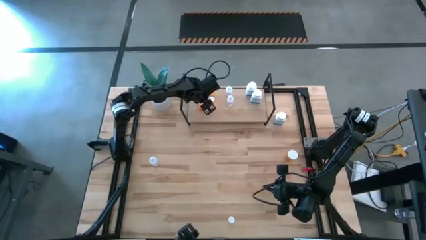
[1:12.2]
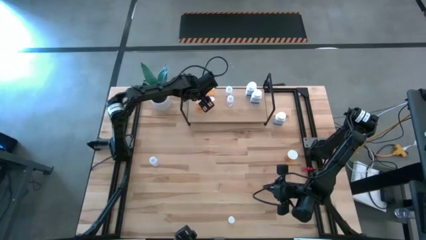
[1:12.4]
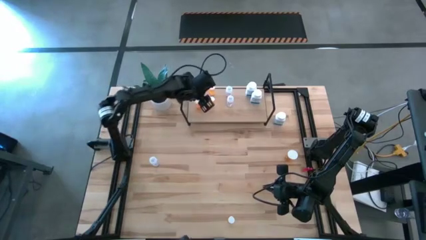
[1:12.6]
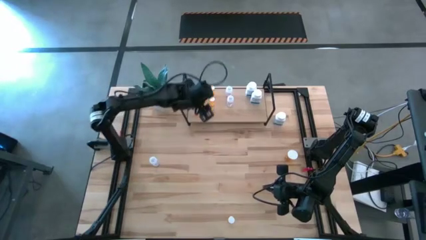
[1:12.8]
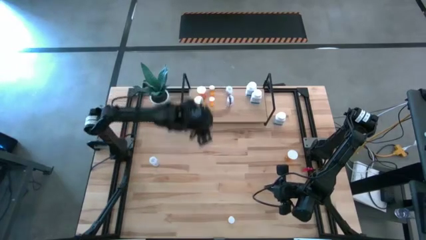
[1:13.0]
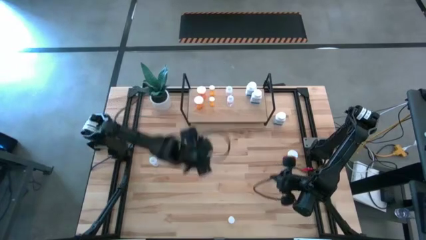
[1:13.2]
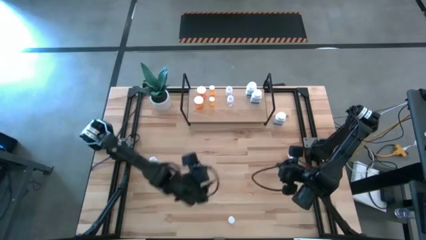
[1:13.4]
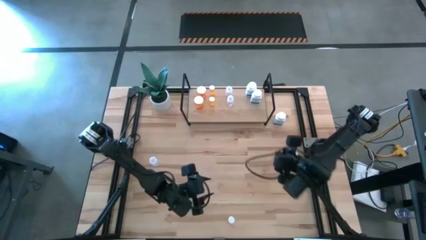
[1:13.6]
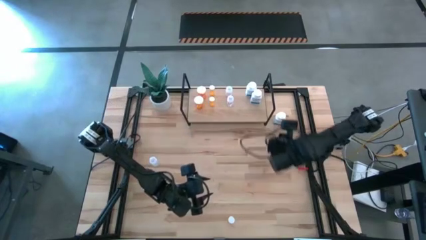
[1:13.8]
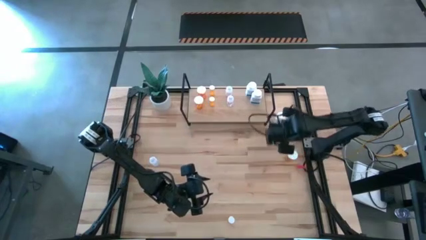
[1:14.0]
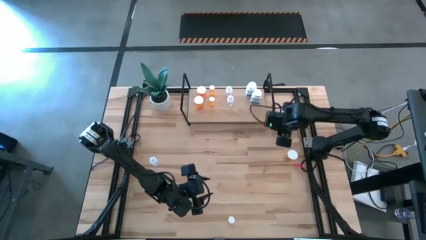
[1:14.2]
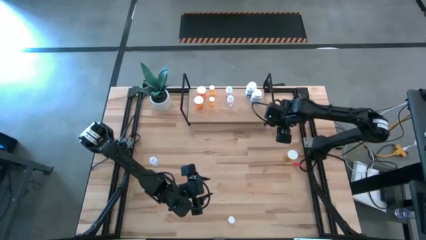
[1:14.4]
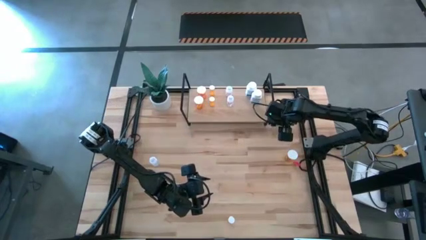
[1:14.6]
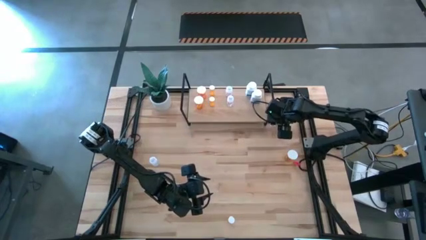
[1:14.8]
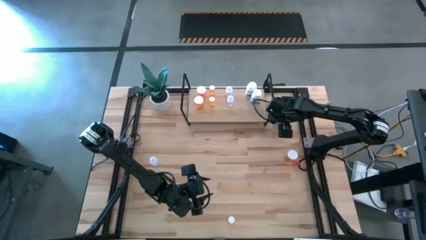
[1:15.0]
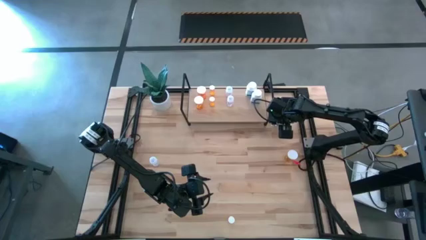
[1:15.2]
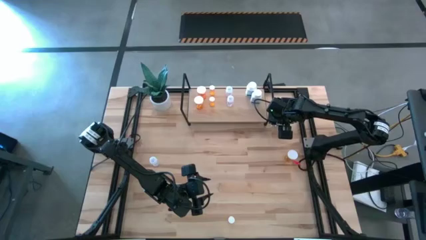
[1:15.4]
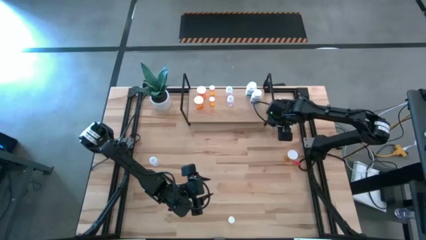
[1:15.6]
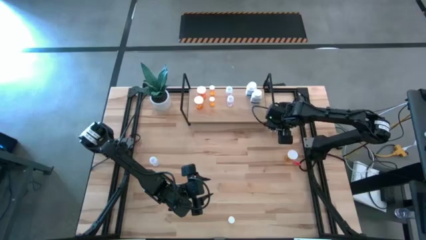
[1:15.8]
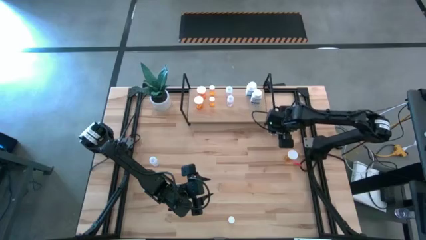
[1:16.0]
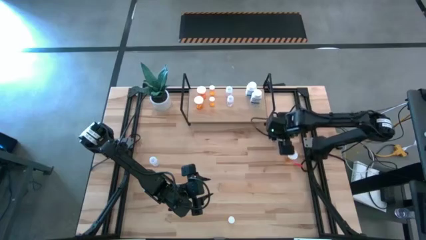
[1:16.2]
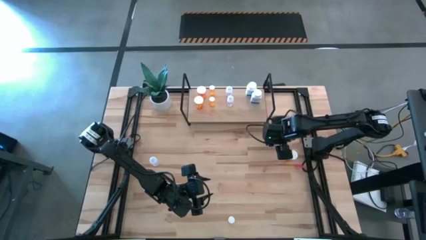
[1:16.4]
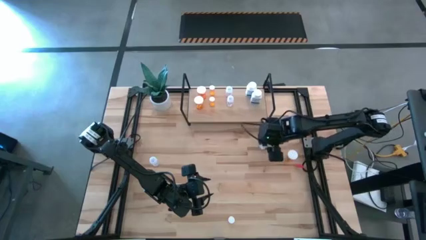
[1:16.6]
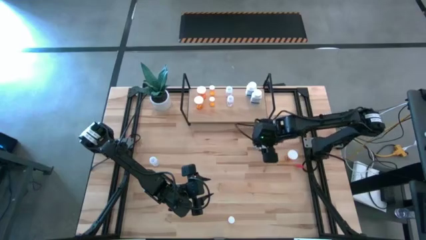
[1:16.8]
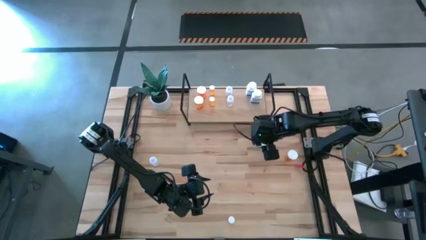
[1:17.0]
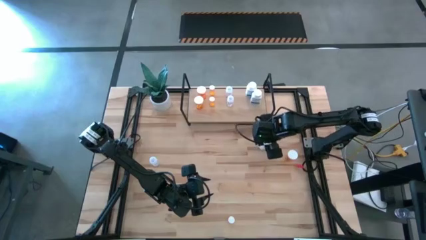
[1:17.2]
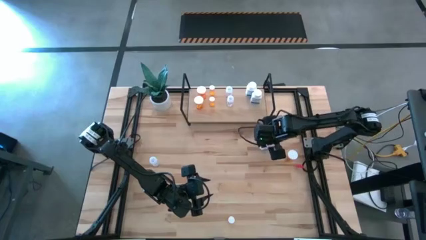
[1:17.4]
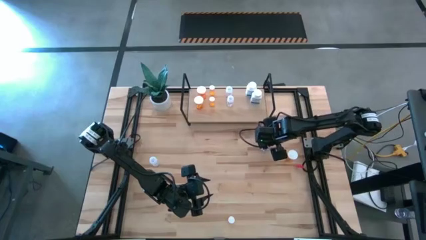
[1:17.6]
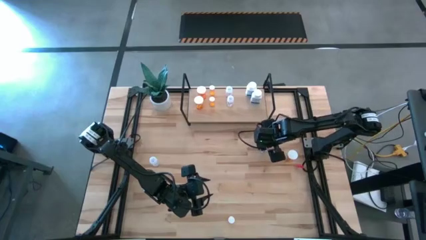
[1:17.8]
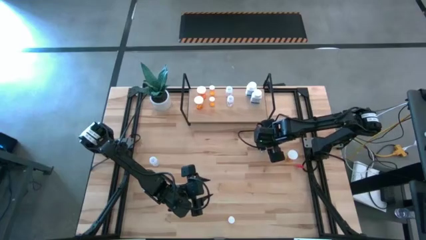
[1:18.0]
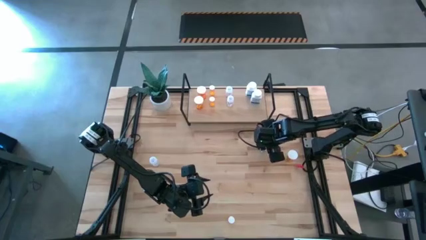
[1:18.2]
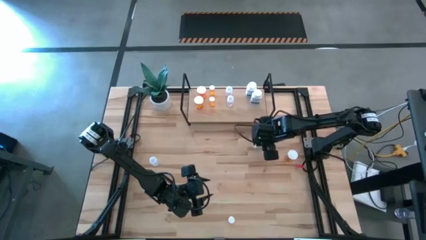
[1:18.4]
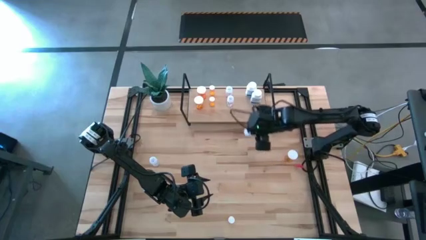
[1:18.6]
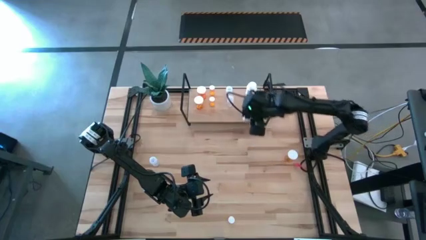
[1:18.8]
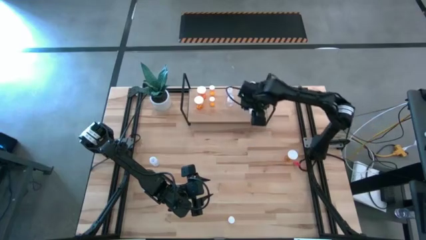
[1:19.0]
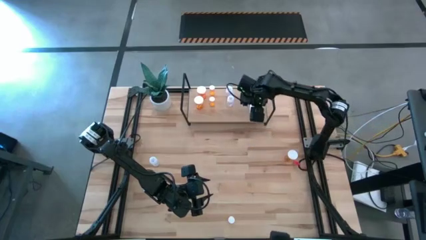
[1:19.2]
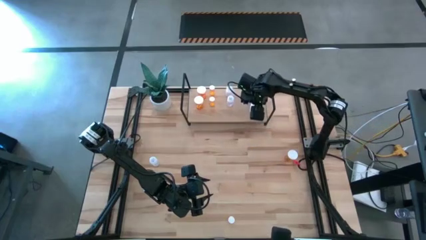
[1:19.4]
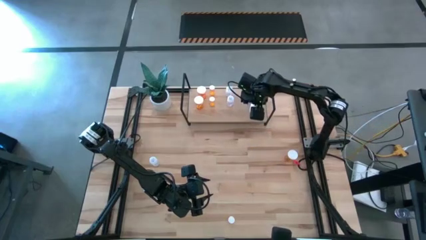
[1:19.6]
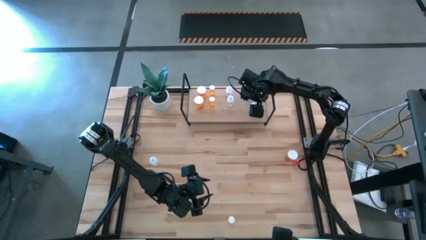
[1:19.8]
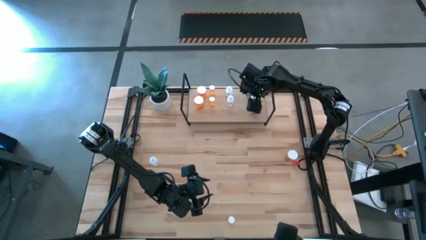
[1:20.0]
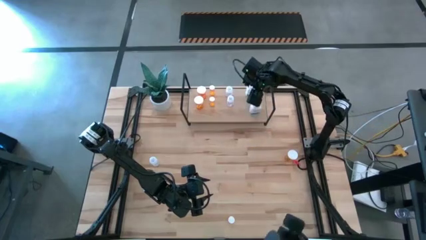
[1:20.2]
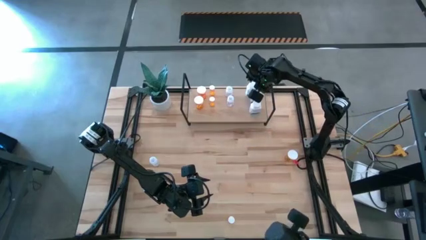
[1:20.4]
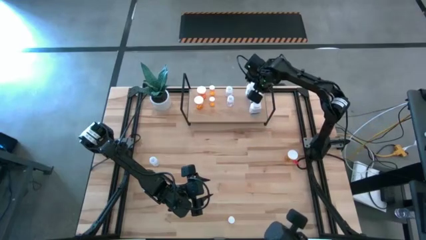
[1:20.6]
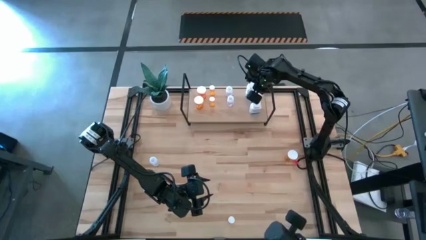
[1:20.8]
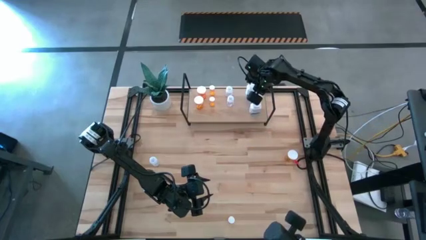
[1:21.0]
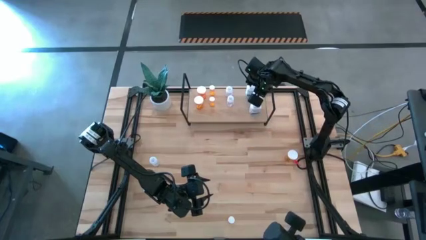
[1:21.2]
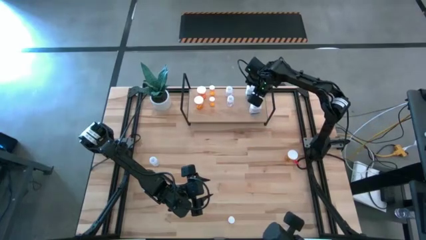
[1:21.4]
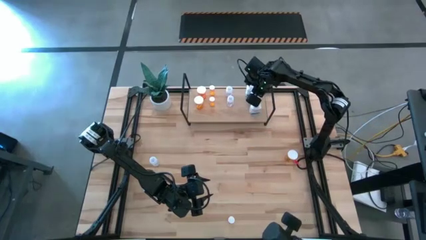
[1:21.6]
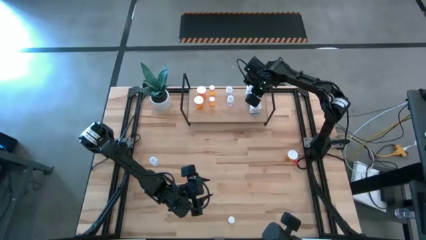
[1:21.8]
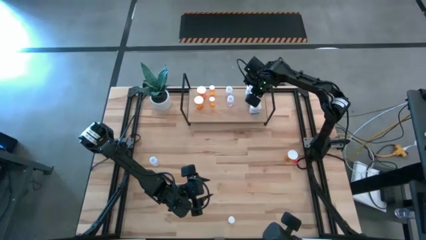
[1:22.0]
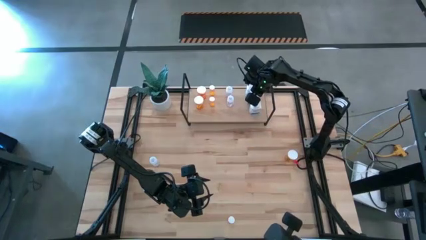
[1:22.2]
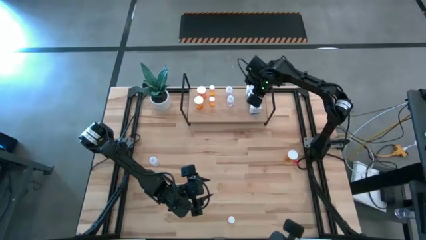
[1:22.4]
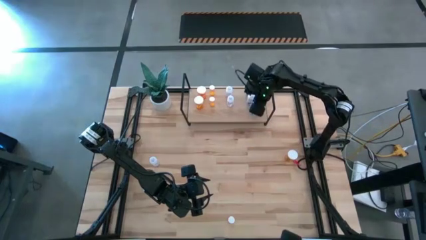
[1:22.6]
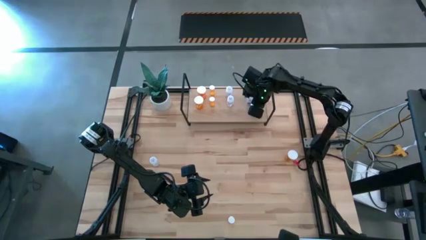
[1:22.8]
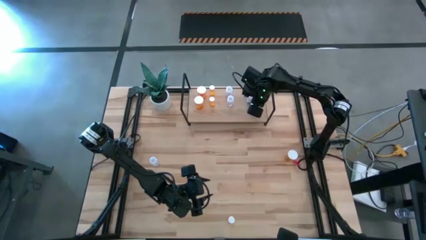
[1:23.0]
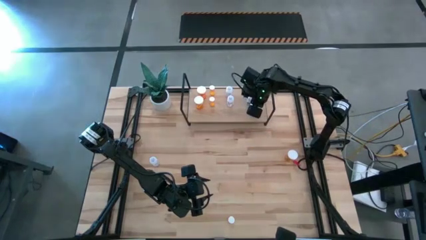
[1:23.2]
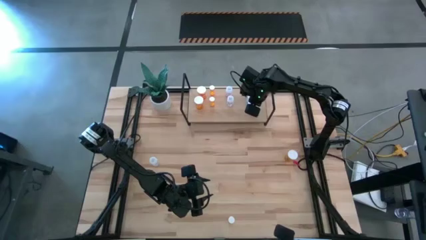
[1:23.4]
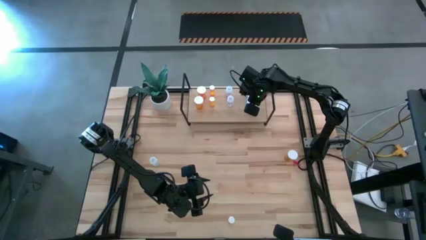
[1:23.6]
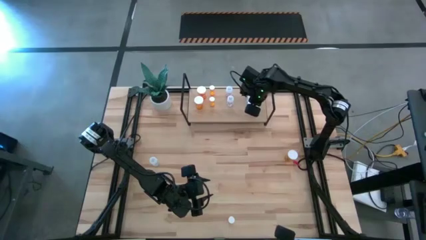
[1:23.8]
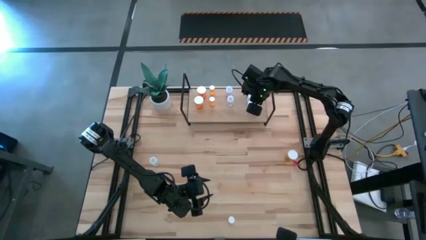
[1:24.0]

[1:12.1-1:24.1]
Task: Pick and place medicine bottles onto shelf by color
Put the white pill bottle on the shelf aligned with the white pill bottles

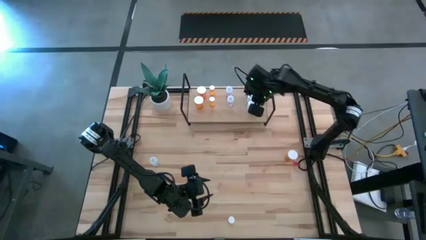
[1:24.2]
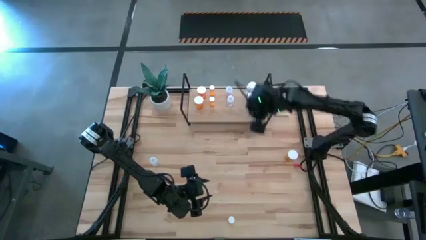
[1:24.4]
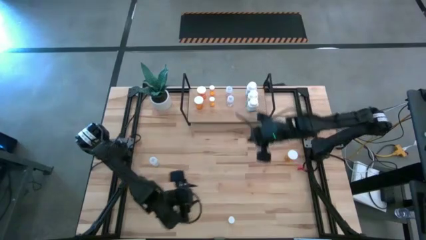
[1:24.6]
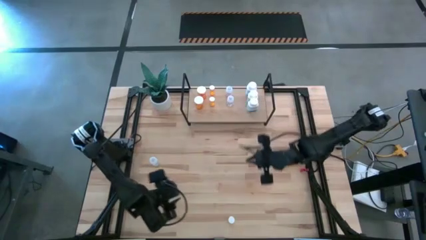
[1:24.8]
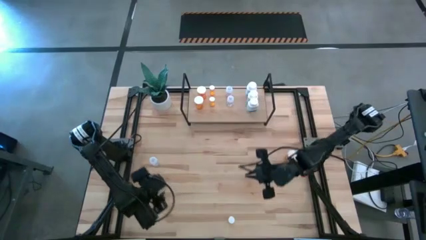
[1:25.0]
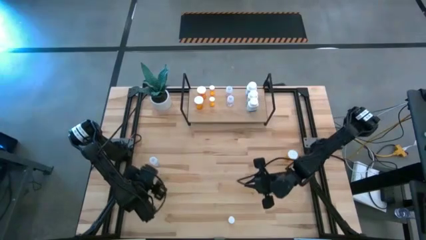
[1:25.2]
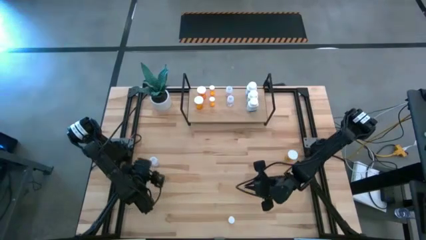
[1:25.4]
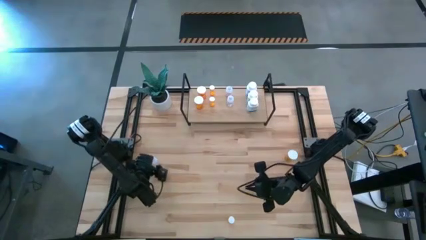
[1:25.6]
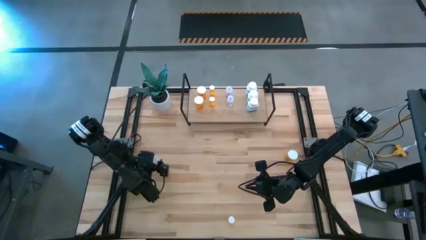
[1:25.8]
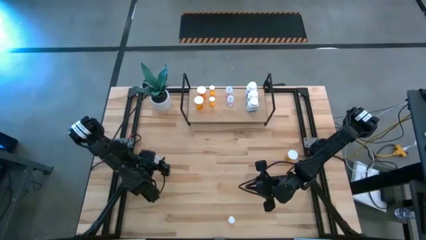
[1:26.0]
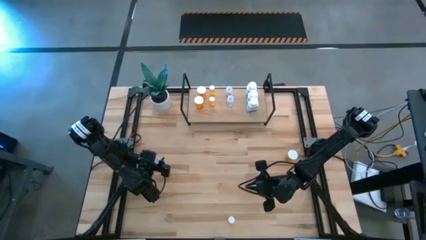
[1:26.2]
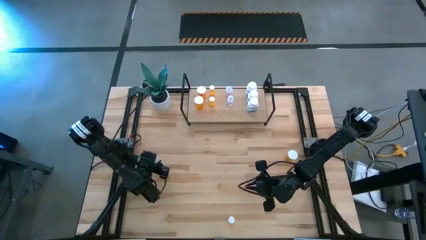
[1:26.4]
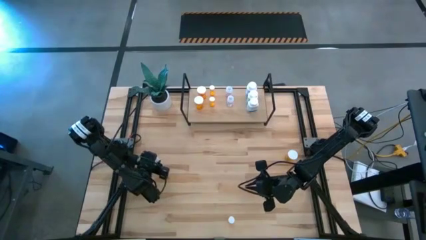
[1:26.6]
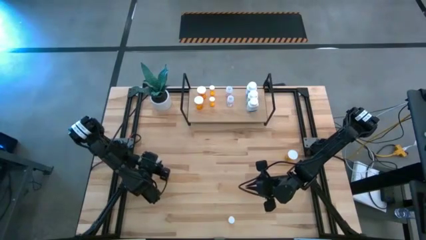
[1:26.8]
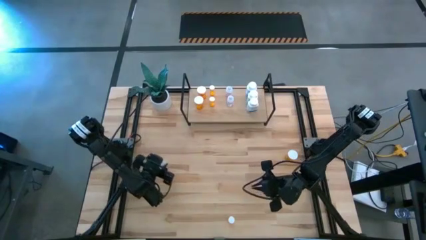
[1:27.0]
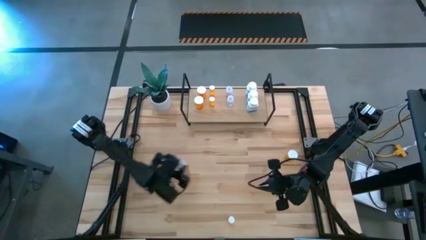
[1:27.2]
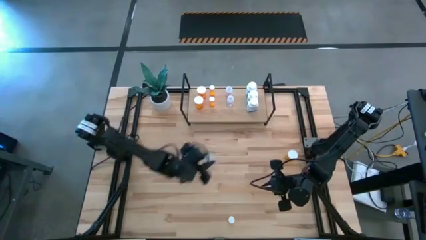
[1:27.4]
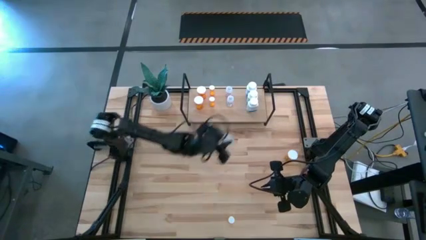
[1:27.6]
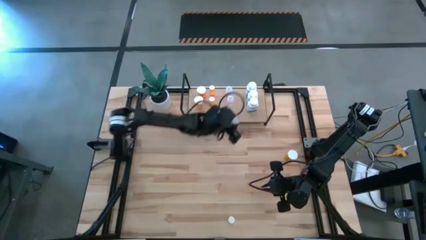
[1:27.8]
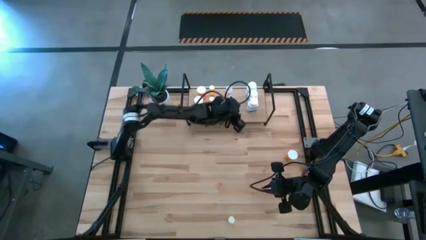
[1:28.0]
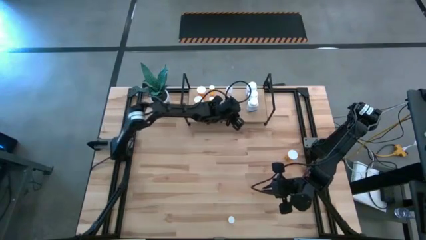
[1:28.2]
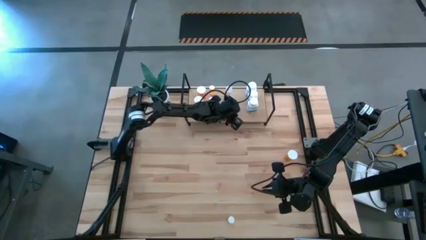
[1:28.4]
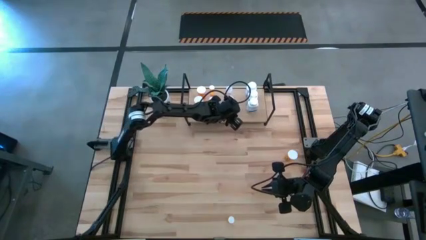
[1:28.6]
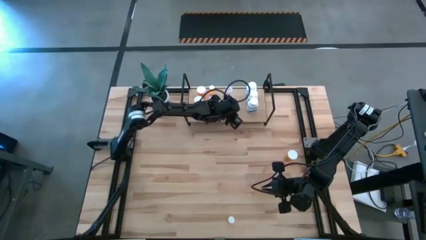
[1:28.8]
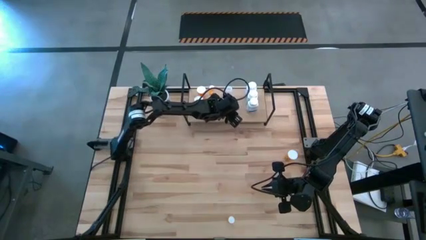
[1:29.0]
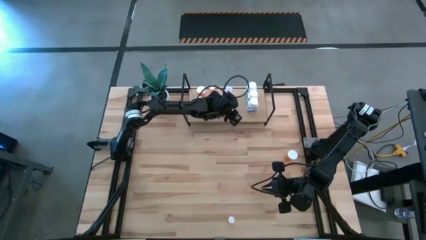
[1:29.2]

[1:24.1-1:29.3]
Put the transparent pill bottle on the shelf aligned with the transparent pill bottles
